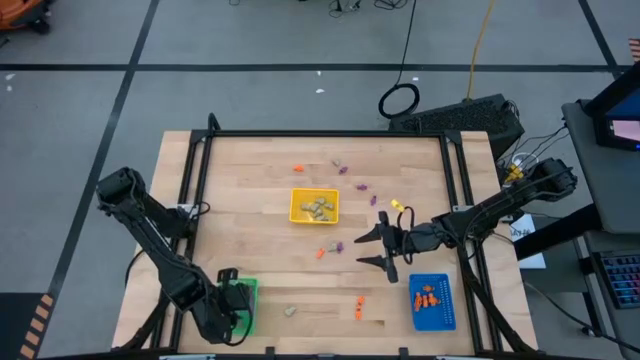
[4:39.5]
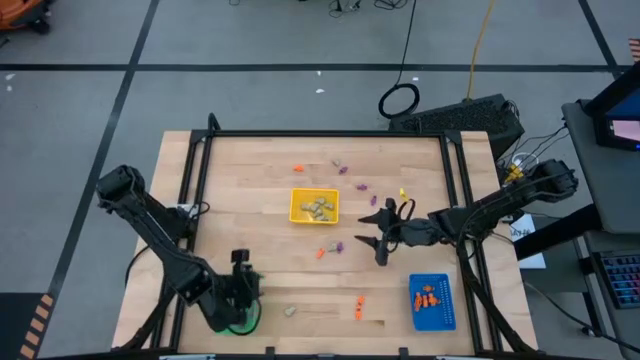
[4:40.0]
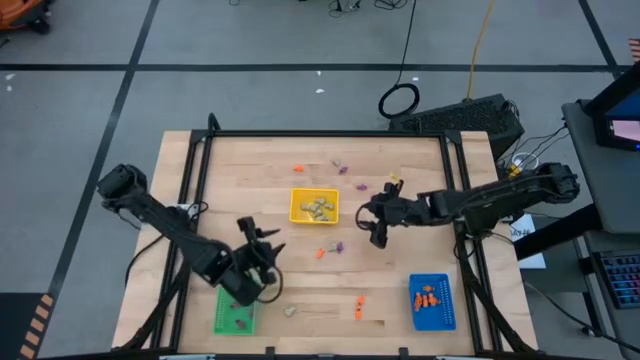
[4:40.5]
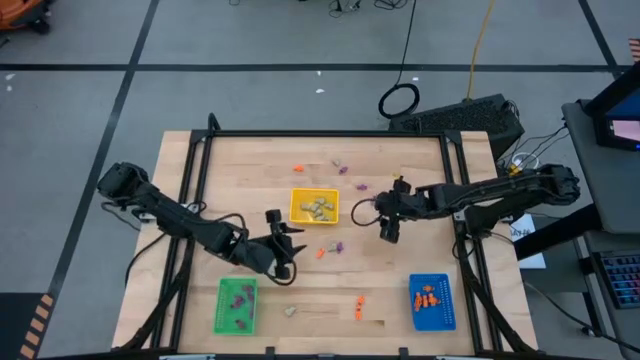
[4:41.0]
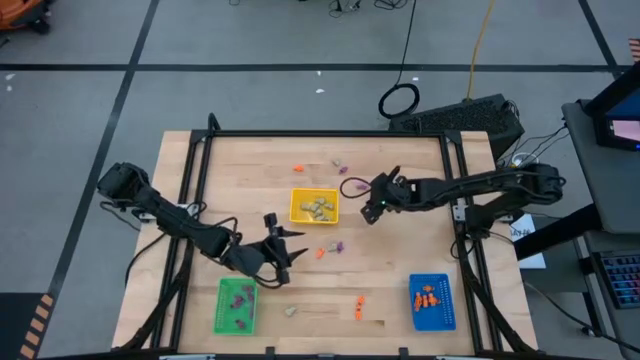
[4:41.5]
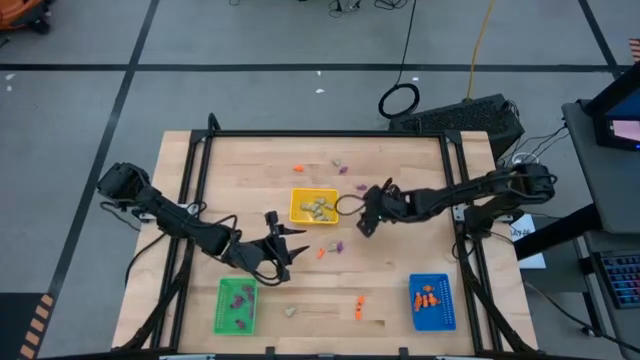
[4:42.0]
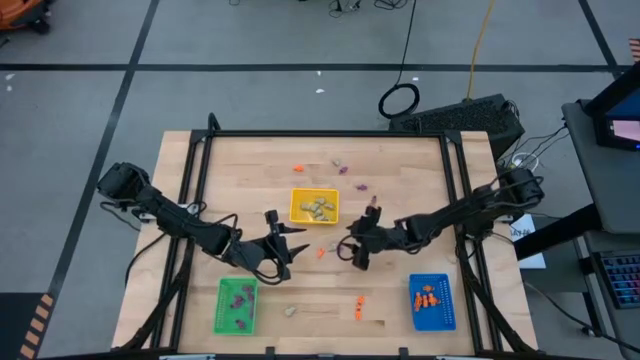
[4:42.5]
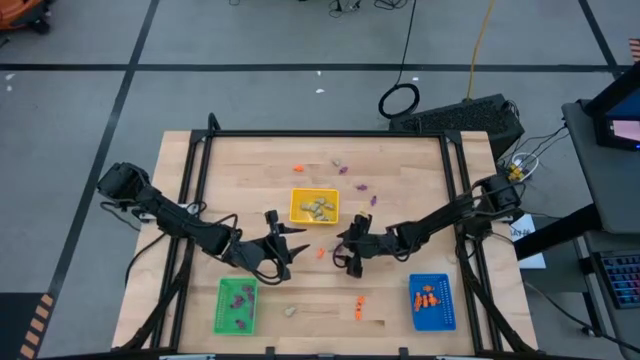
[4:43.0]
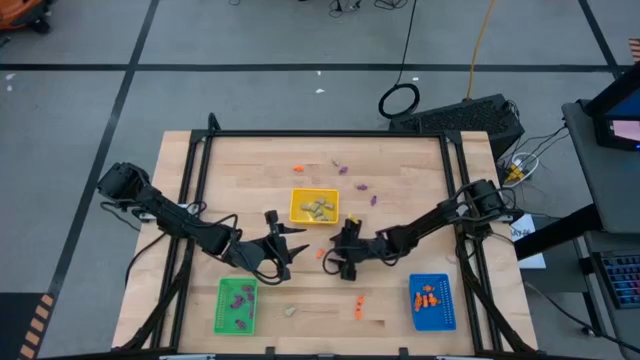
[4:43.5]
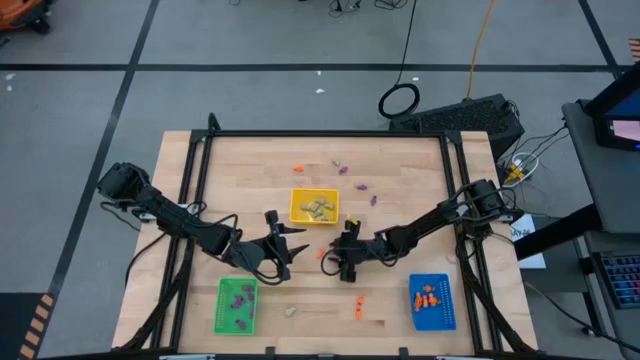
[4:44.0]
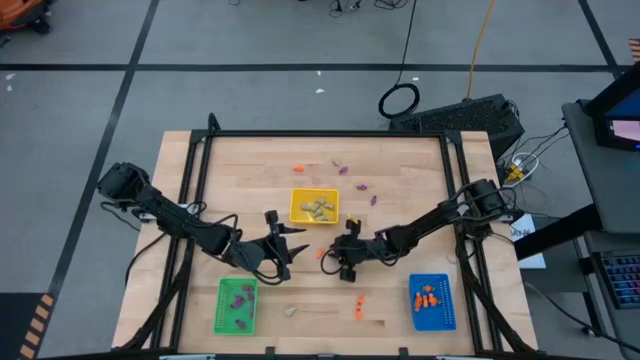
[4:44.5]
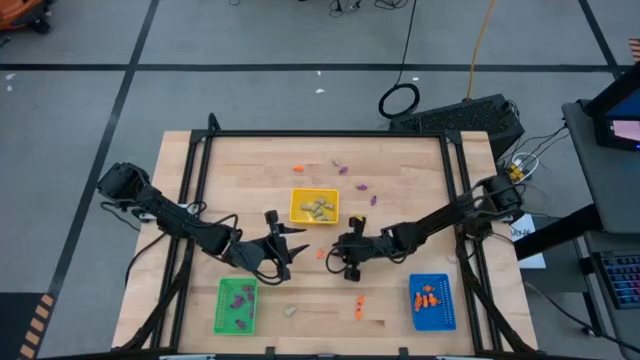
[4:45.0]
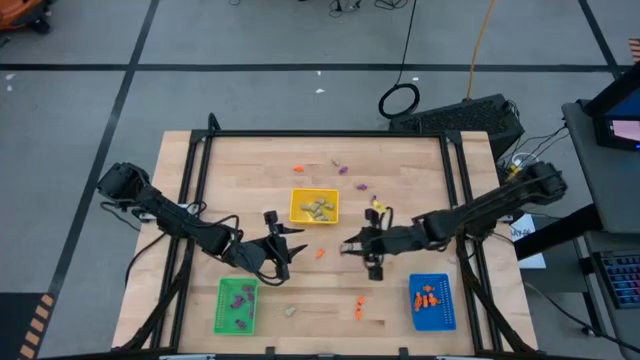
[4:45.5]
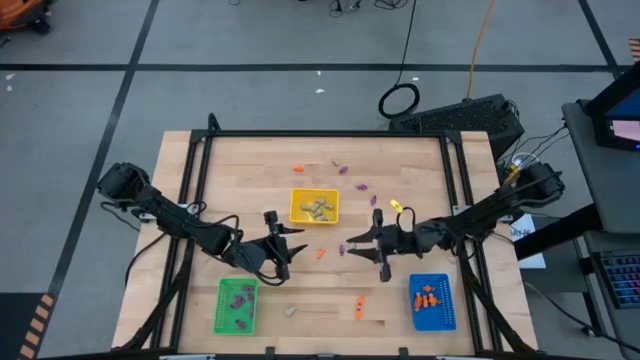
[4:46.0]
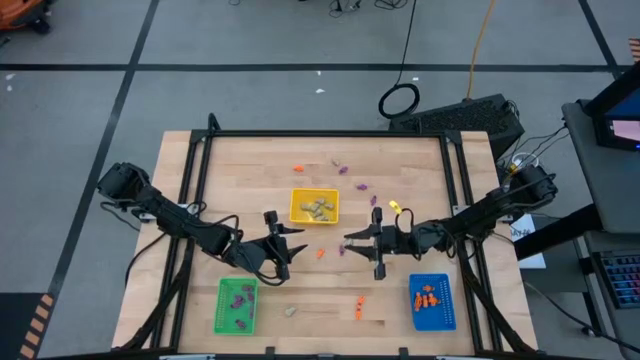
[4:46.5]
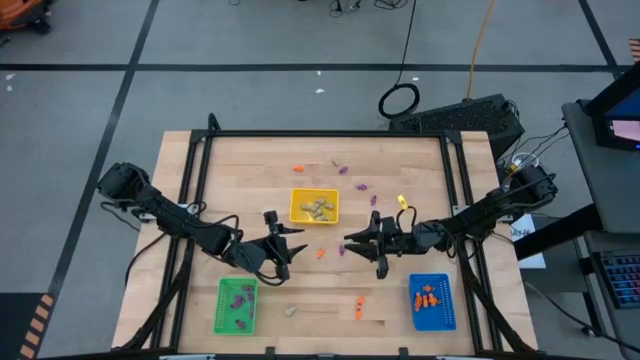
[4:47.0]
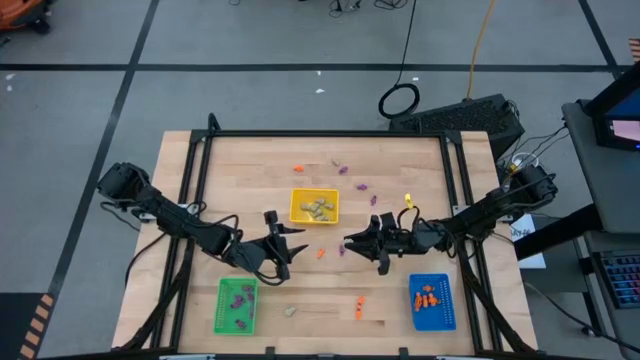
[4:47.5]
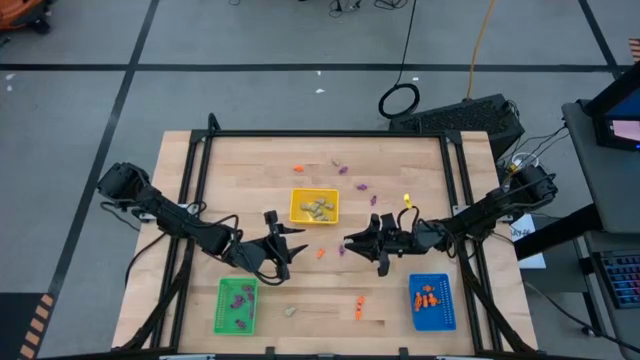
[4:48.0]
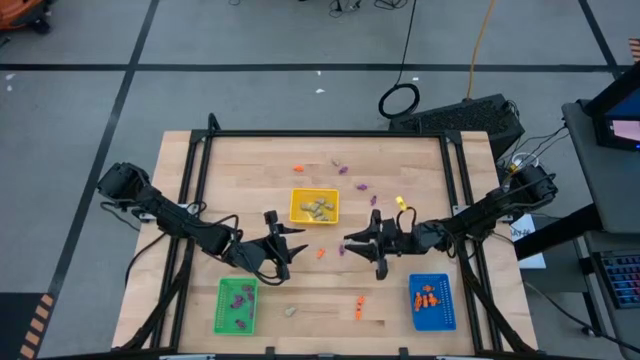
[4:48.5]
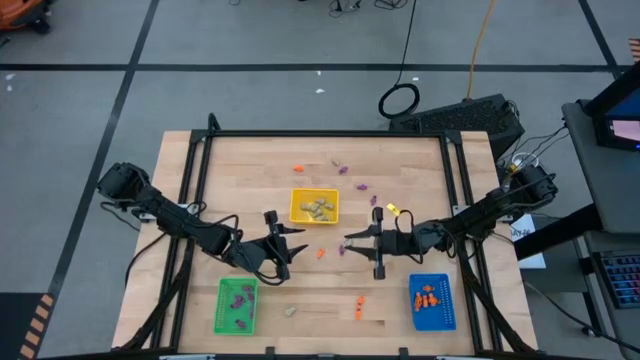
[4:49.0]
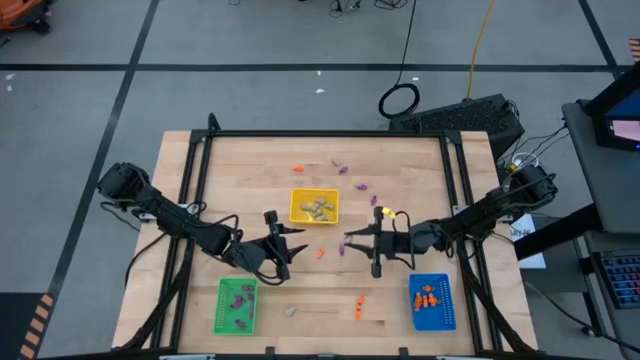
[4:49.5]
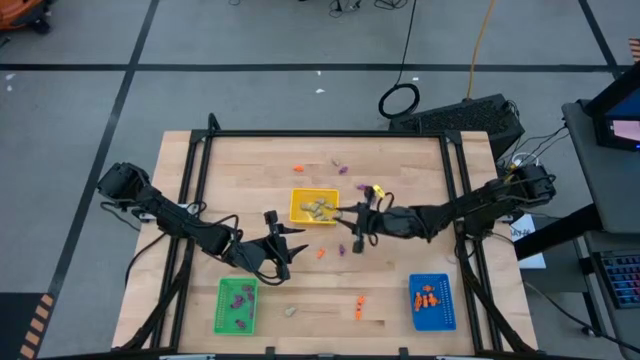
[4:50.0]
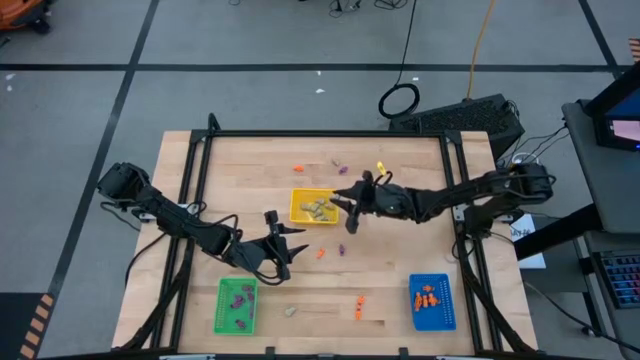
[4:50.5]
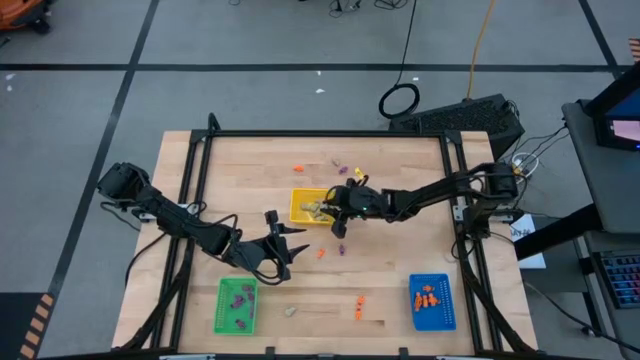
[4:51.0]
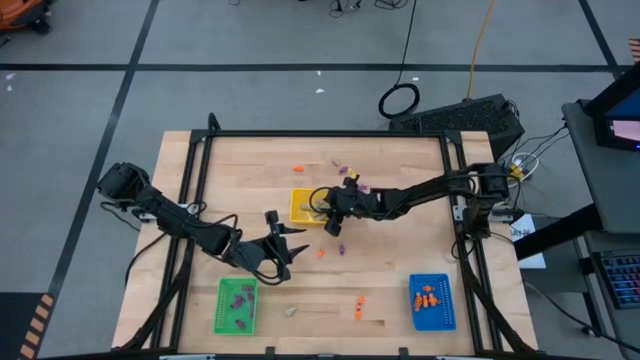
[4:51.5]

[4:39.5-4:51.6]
Task: Sort Halloween decoration
Put the white skull toy in the yellow basket

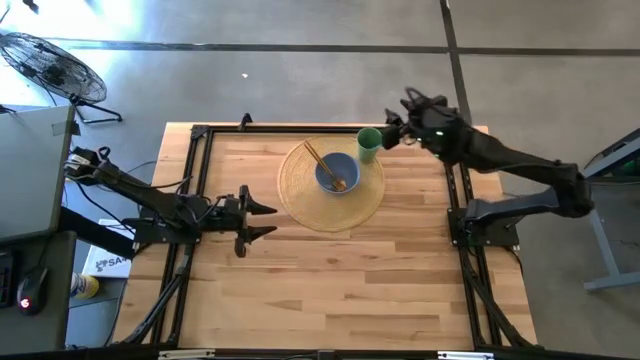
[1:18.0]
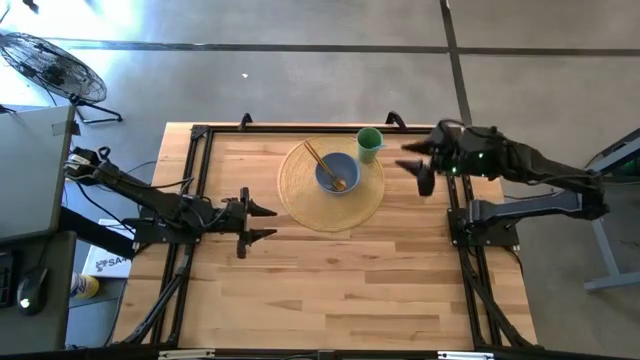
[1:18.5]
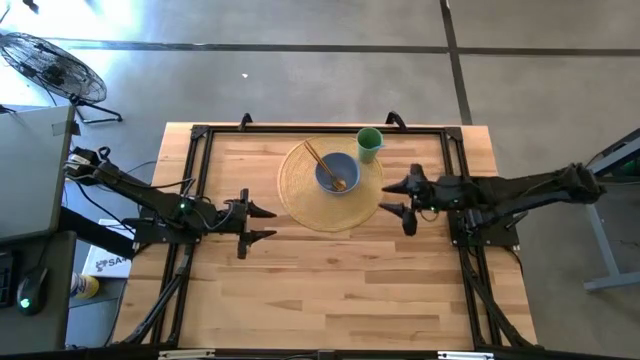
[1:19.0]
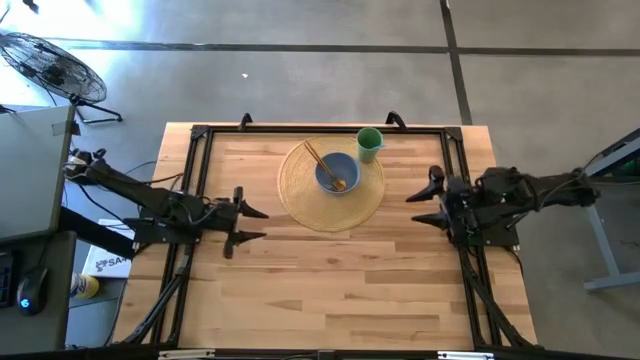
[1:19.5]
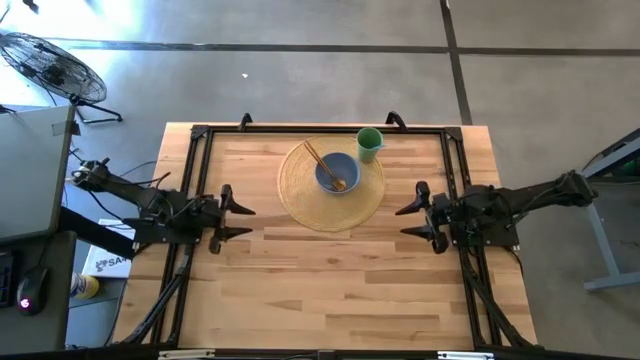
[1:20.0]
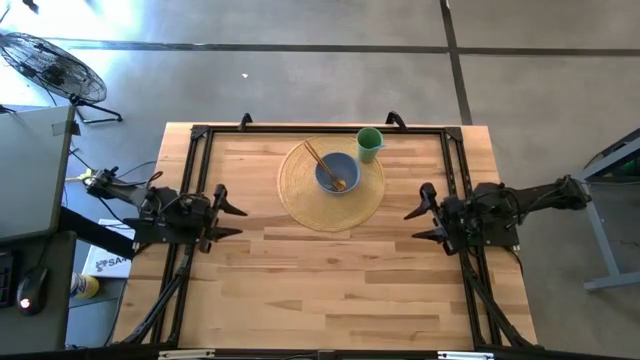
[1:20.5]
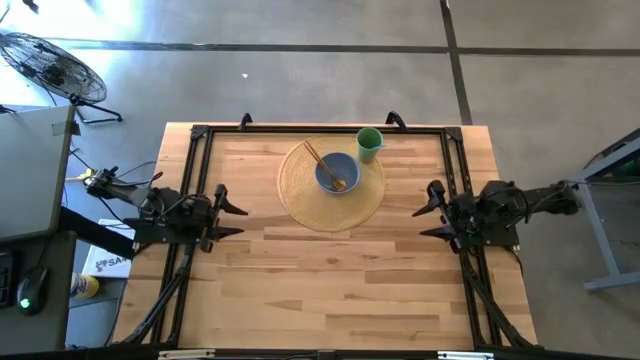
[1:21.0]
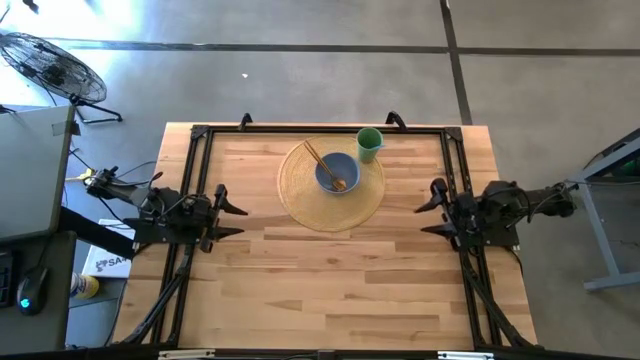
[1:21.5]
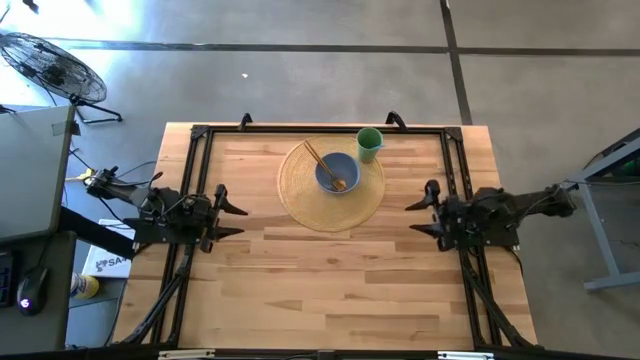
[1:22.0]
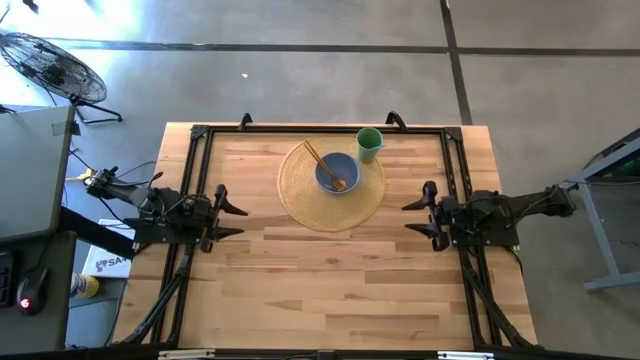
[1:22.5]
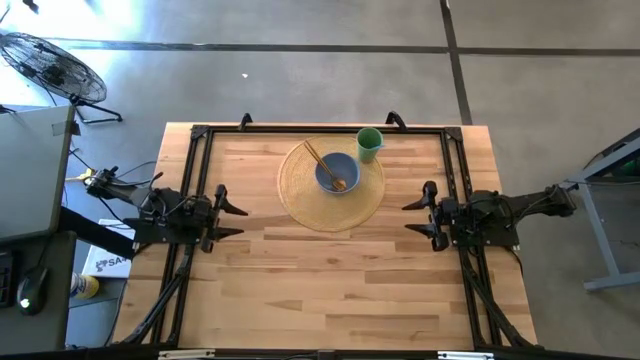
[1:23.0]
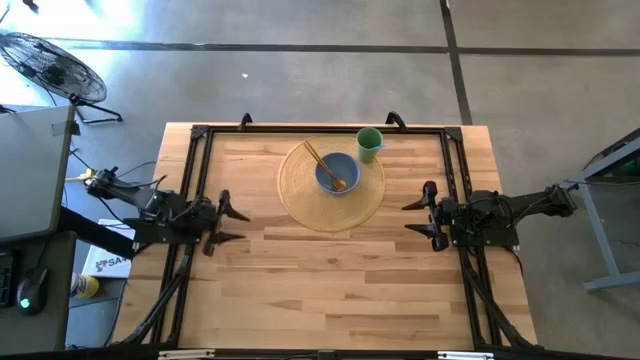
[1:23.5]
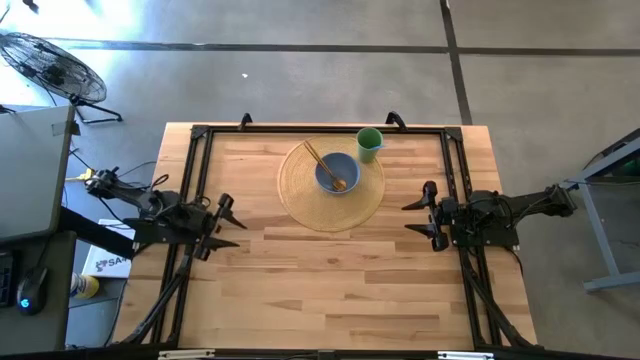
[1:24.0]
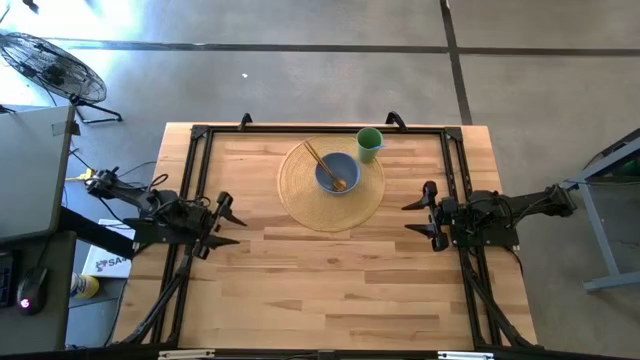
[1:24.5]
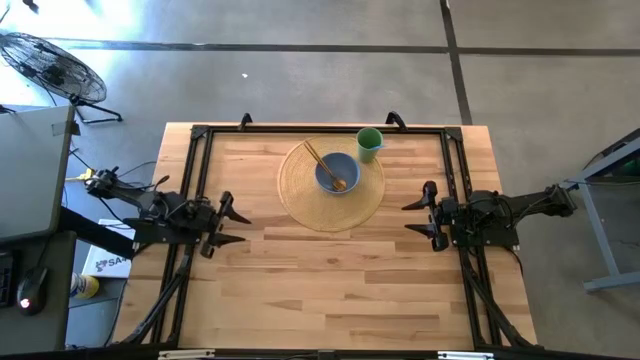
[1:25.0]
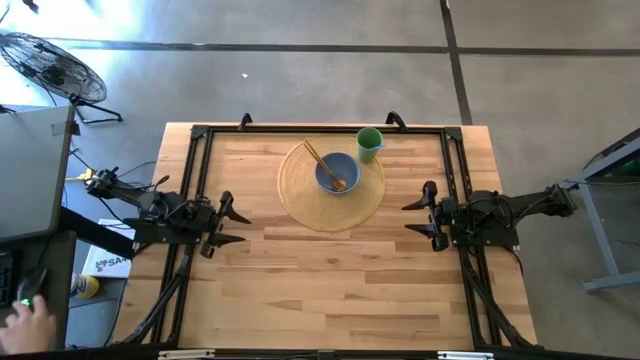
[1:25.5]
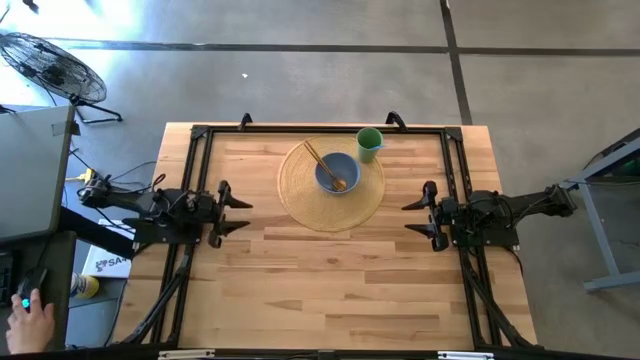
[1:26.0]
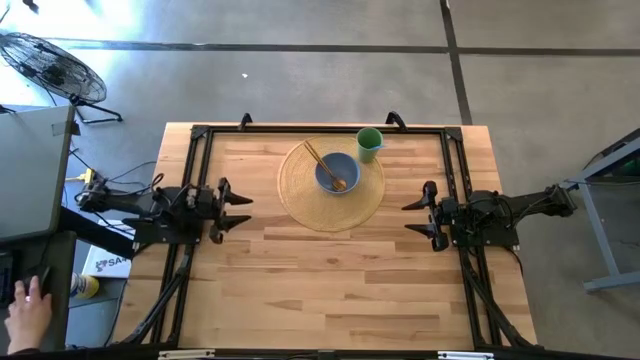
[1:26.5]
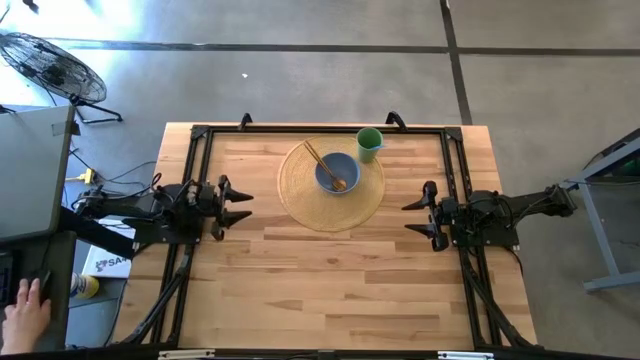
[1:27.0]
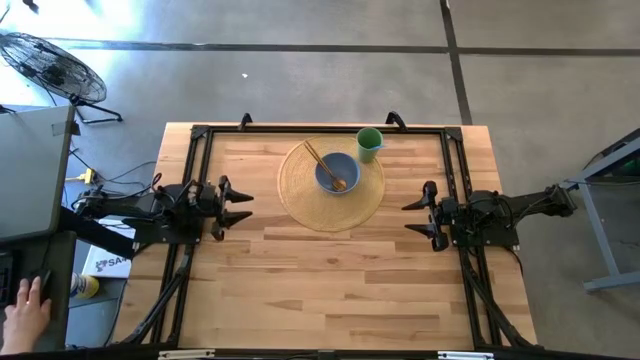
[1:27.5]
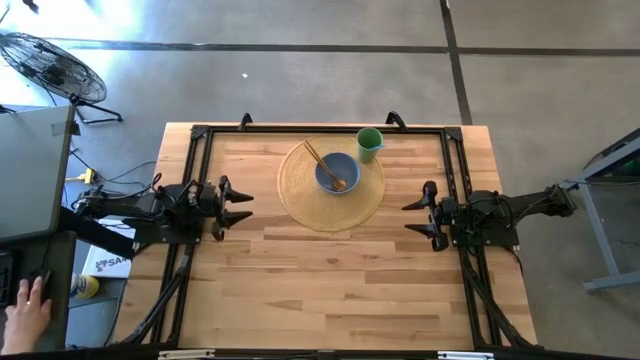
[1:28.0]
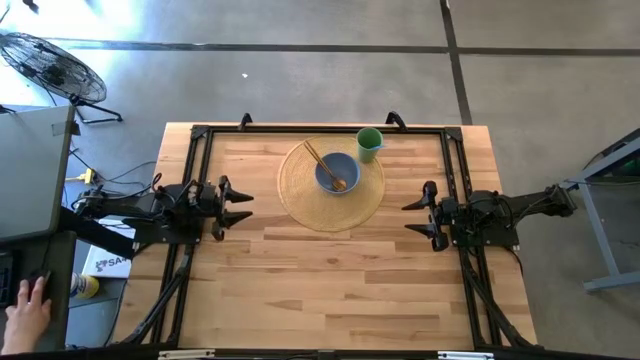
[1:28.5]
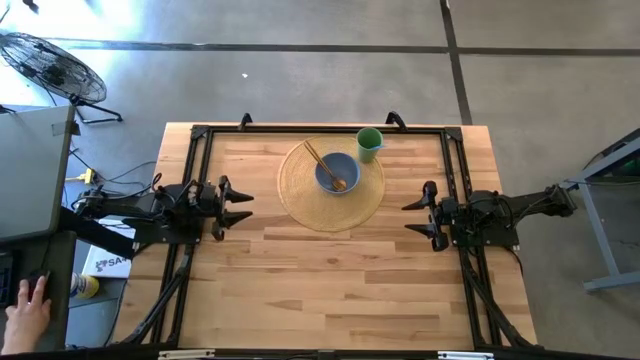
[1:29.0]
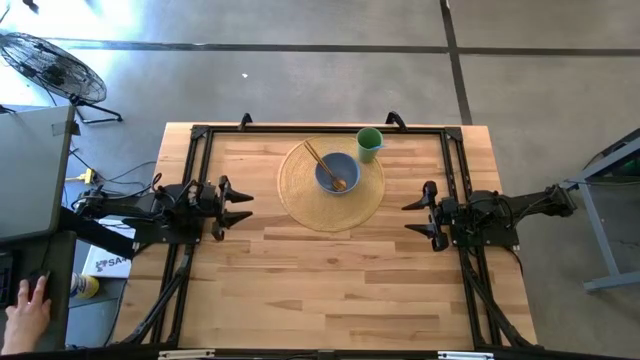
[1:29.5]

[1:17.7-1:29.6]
Task: Pick & Place Utensil
Return to Home Position
